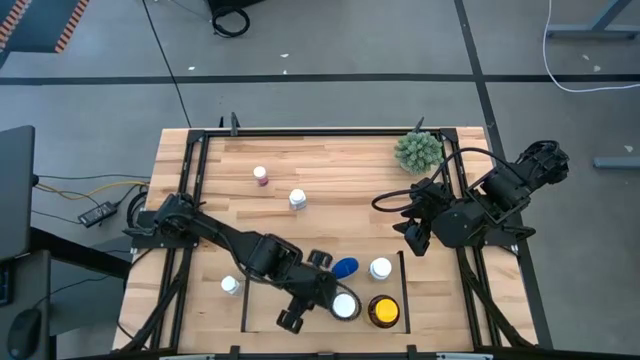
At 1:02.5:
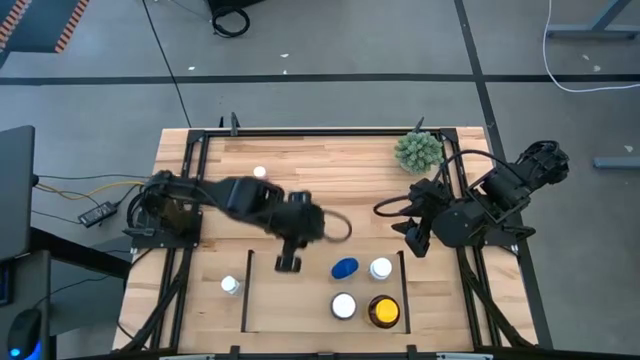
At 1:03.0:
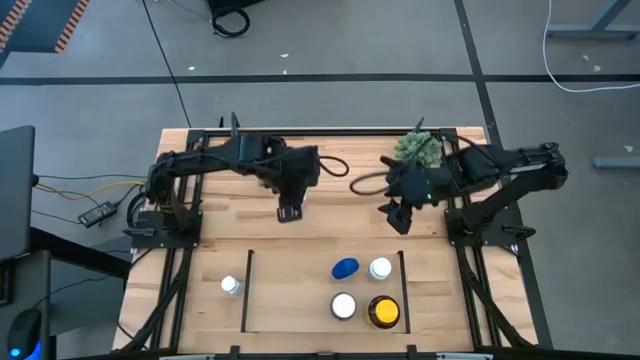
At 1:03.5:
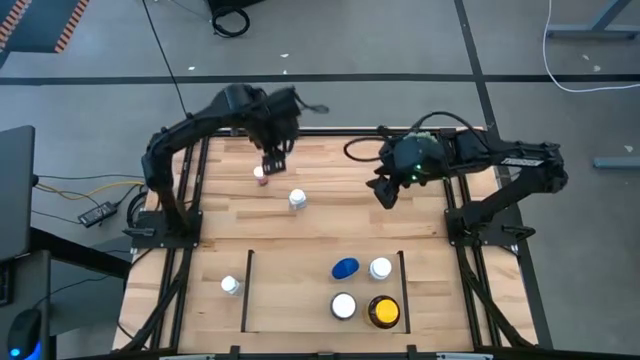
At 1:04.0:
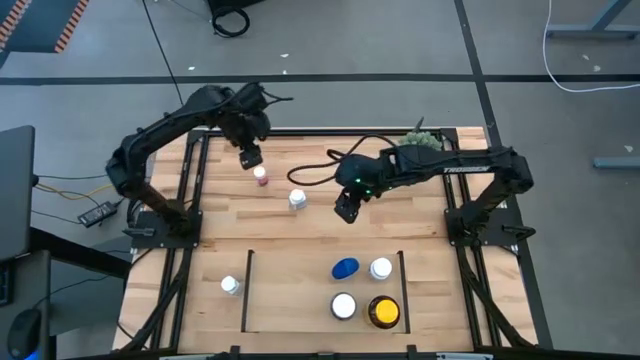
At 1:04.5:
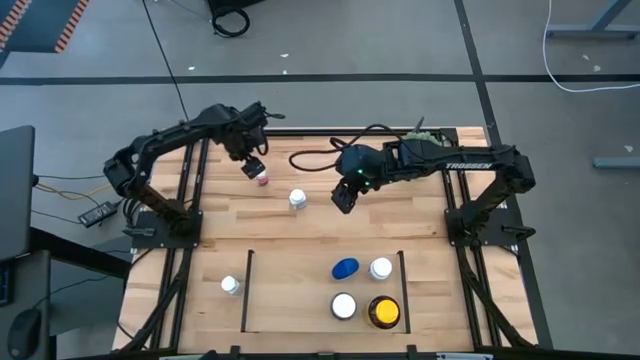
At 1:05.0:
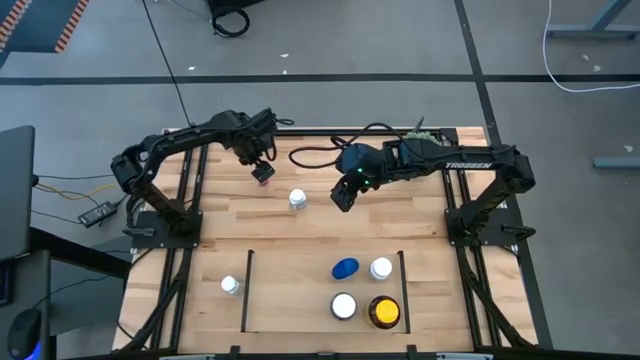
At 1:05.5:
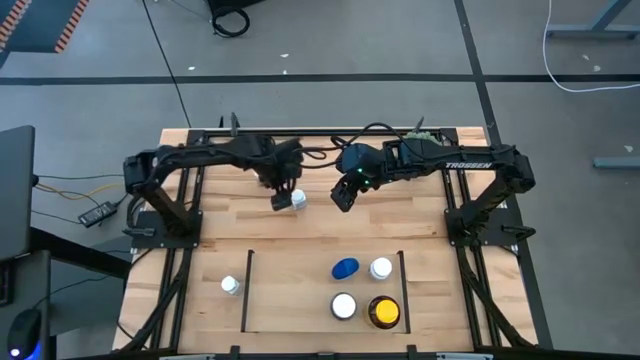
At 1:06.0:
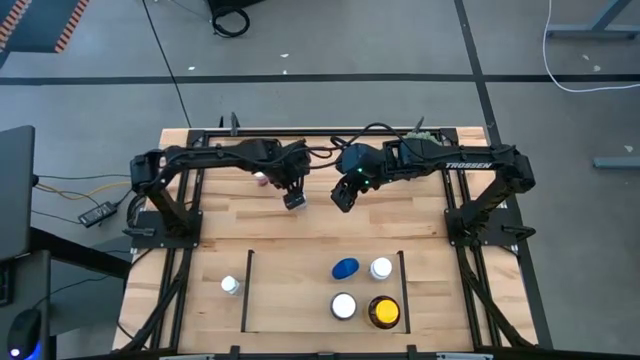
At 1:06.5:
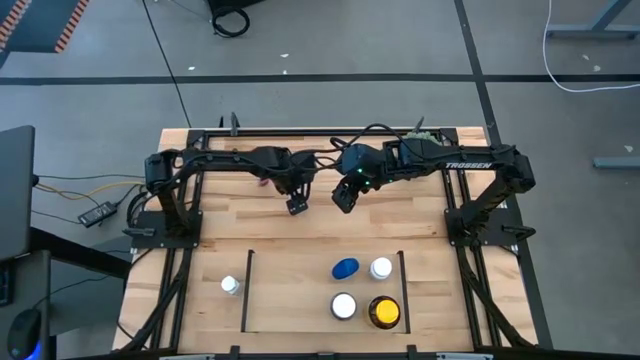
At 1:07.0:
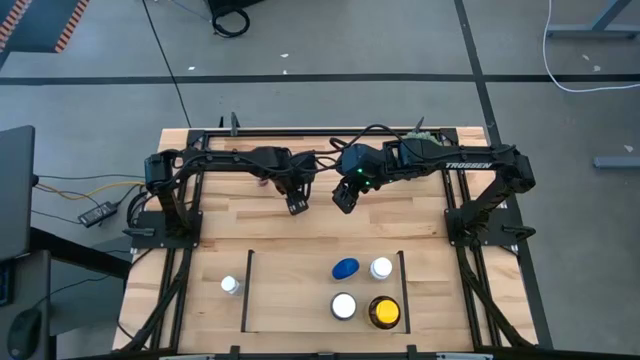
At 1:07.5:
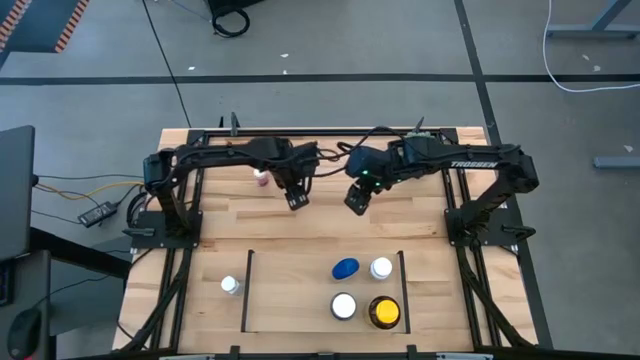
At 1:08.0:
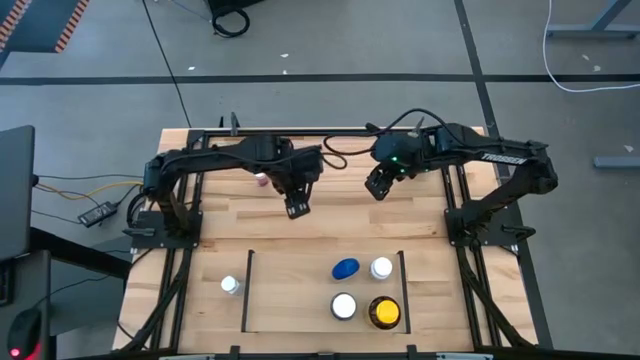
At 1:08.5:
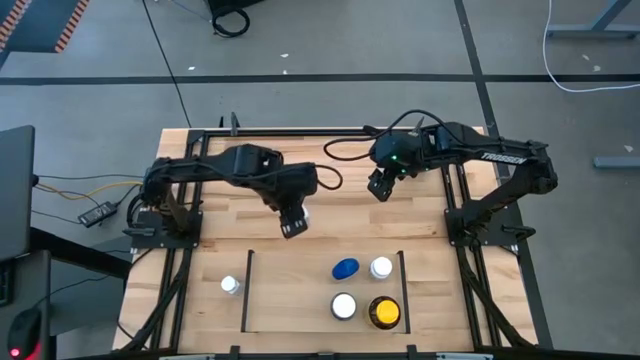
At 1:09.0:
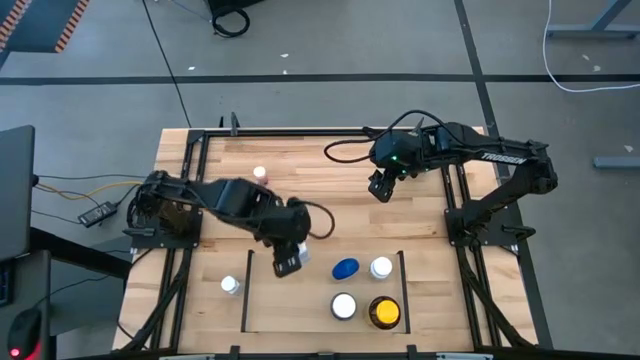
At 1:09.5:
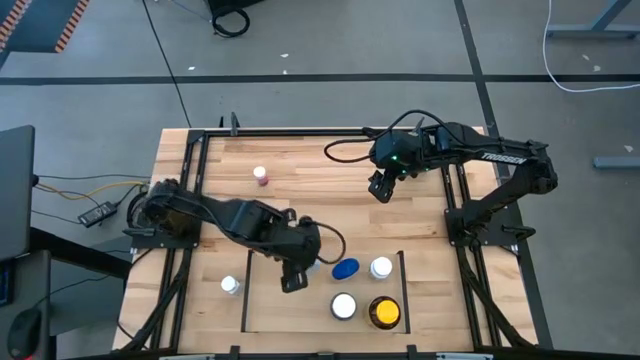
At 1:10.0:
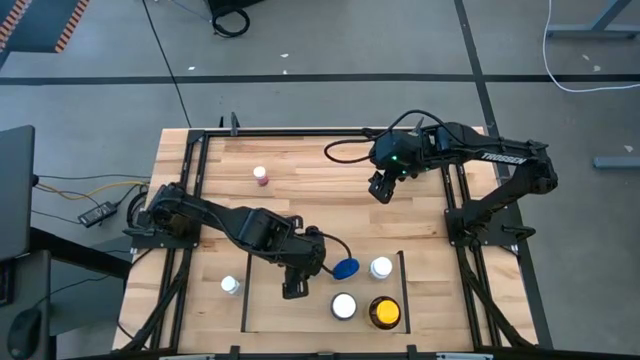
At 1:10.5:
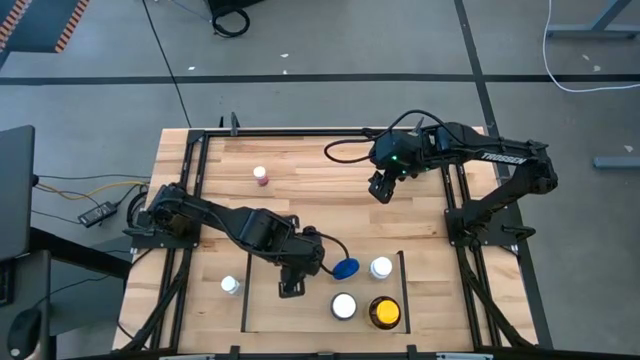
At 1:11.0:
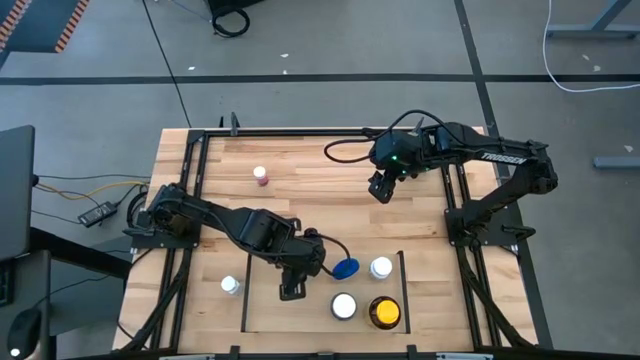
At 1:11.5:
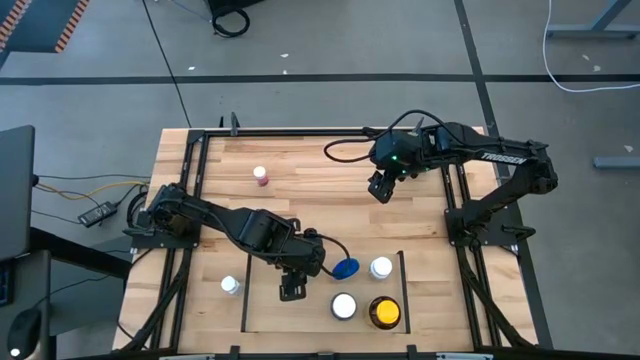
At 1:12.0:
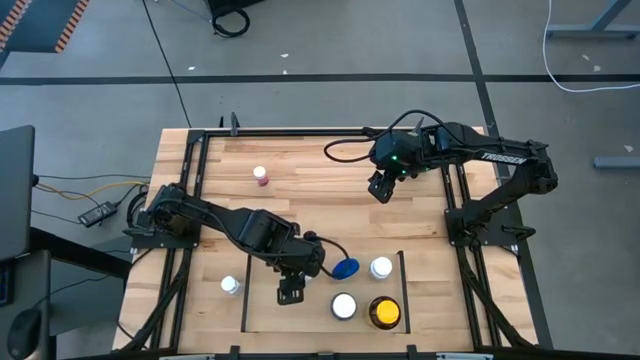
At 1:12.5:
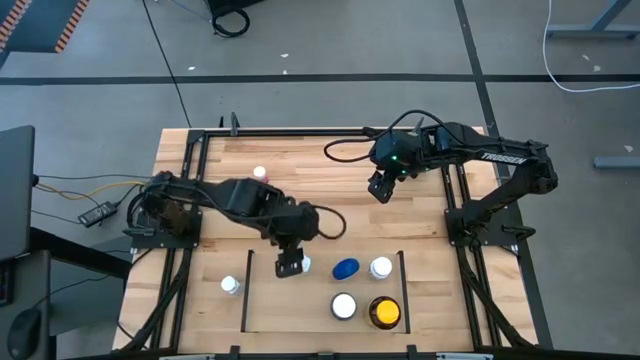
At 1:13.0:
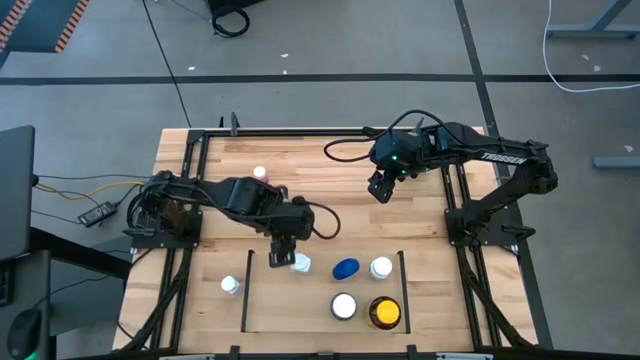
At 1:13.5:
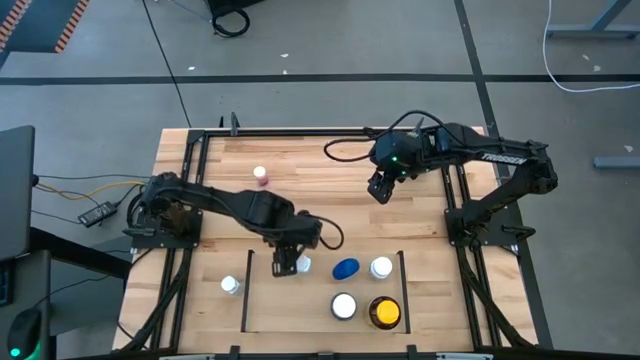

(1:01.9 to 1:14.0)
Task: Pick and place medicine bottles onto shelf by color
Put the top white and blue medicine bottle on the shelf

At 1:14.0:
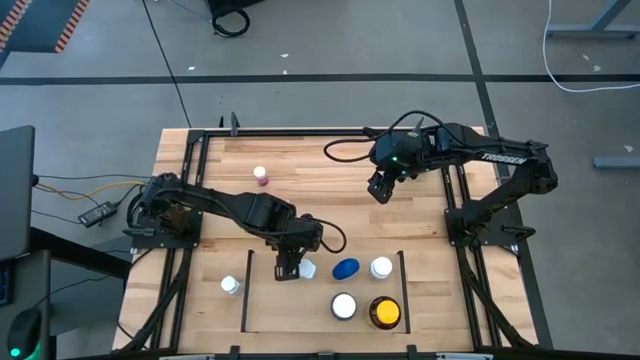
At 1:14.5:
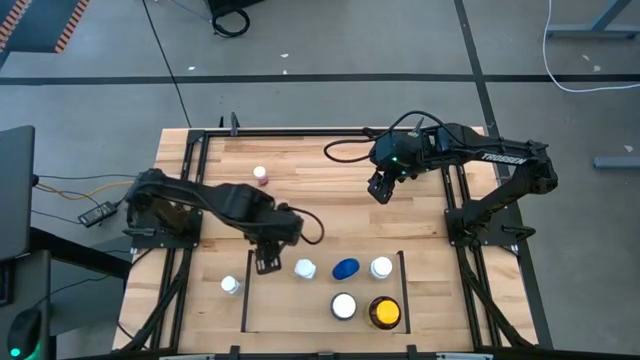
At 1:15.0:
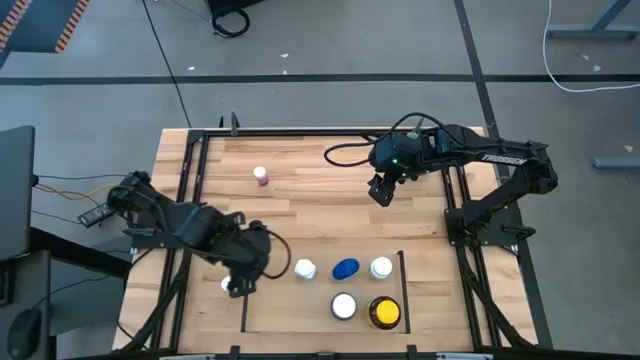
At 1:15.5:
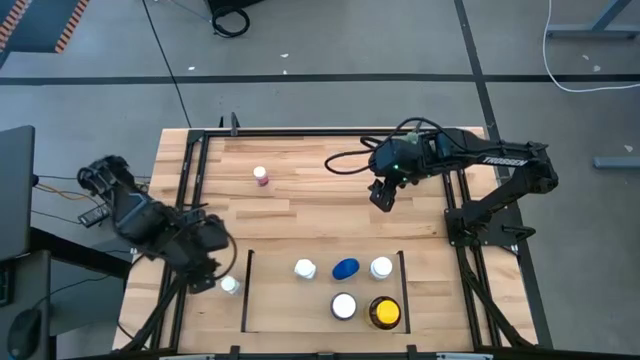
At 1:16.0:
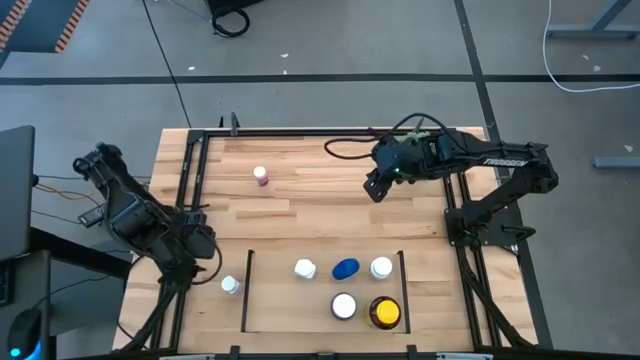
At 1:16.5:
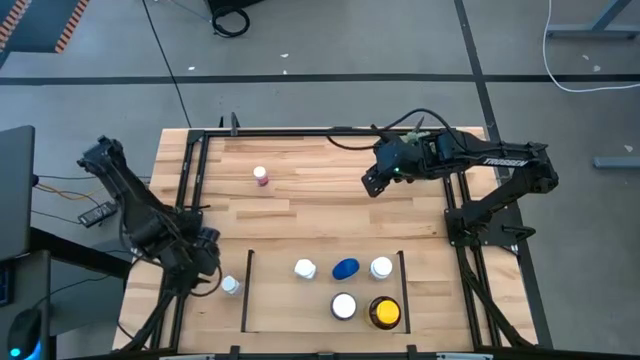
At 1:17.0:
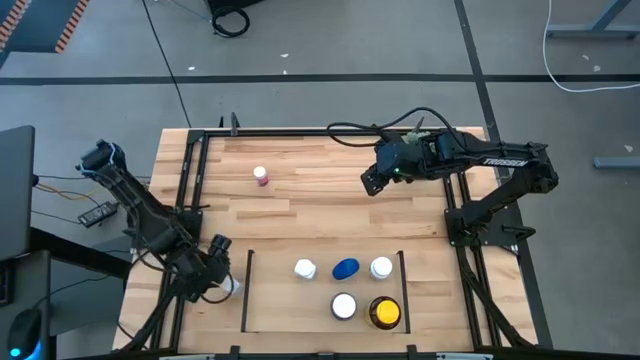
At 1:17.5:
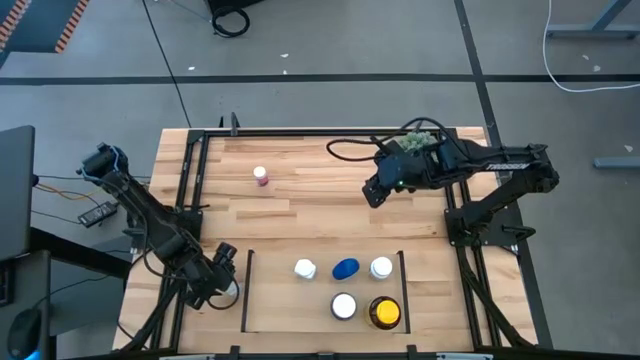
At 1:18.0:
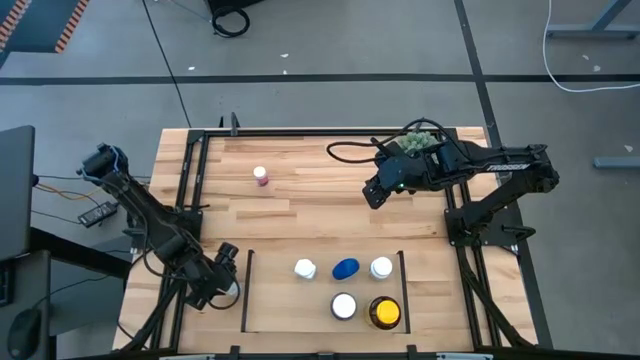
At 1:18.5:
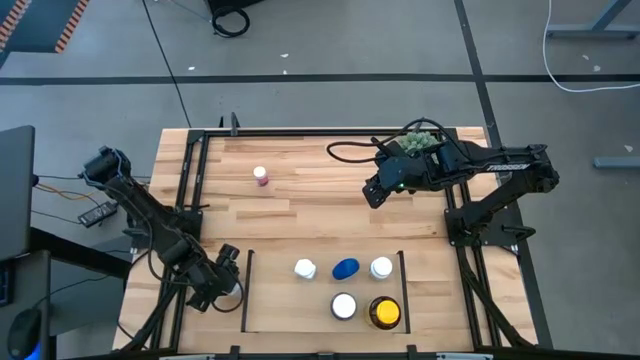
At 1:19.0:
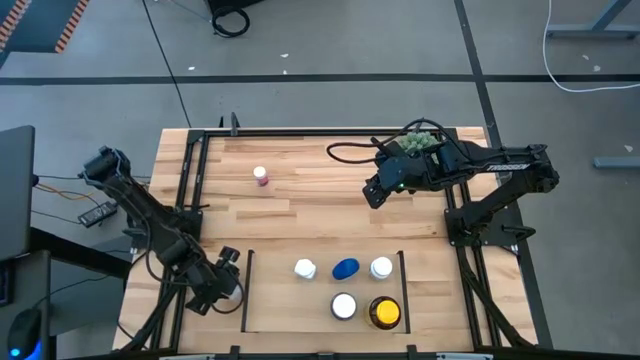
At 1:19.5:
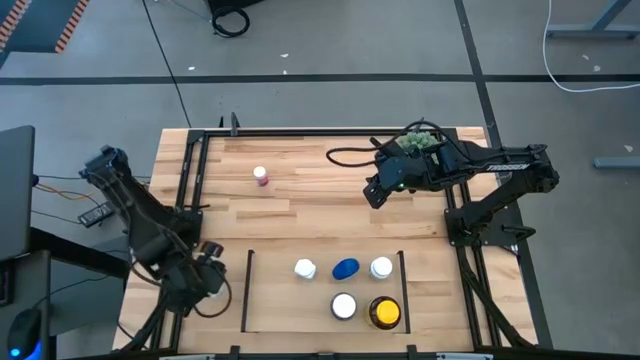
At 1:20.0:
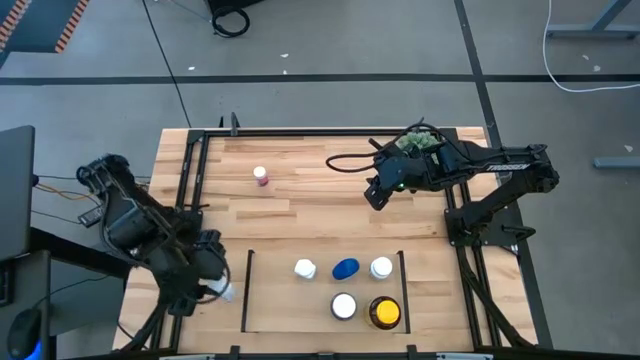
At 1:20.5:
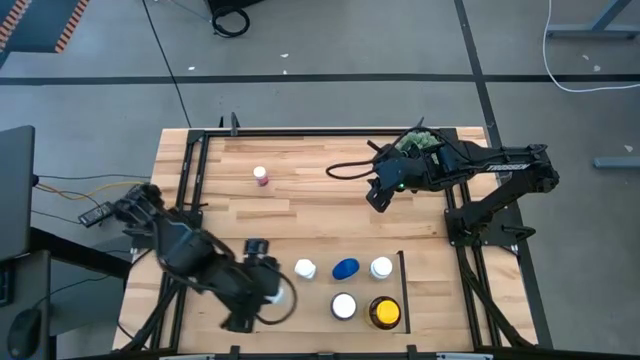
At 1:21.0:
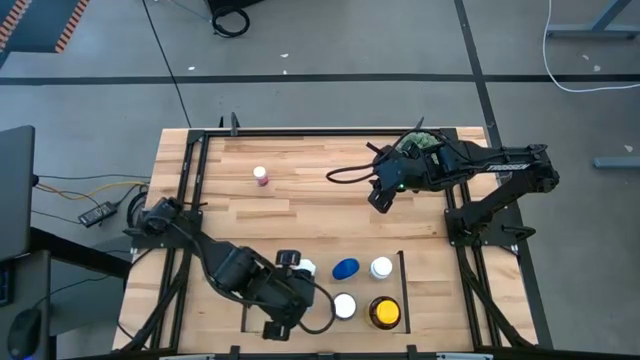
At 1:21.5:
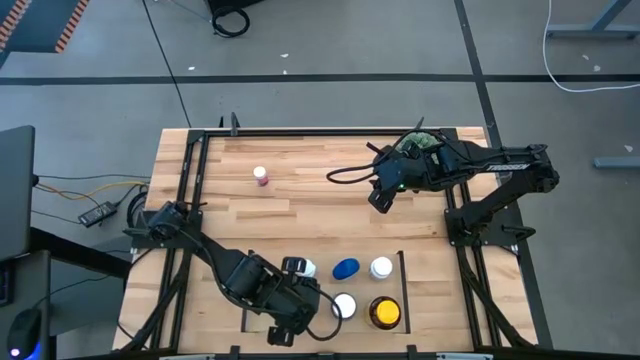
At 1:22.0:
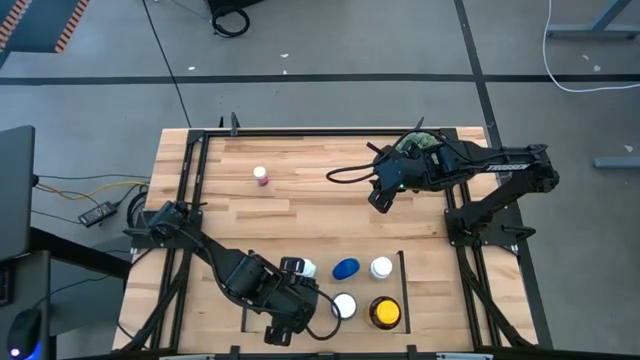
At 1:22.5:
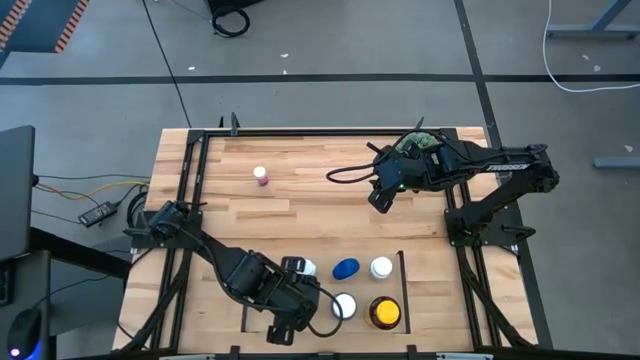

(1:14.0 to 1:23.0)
Align the white and blue medicine bottle with the other white and blue medicine bottle on the shelf

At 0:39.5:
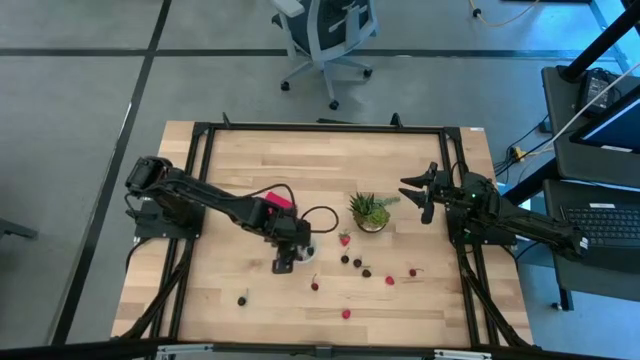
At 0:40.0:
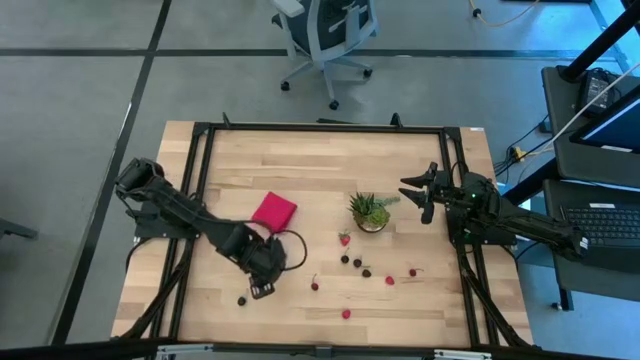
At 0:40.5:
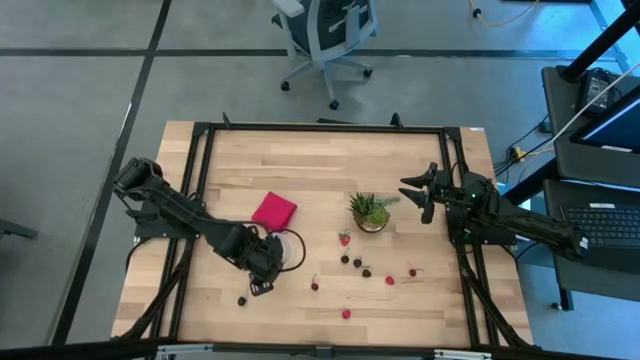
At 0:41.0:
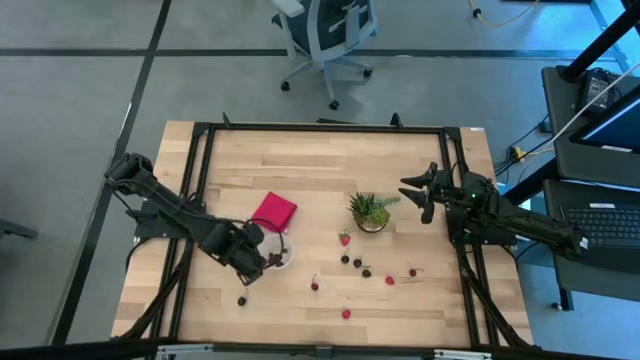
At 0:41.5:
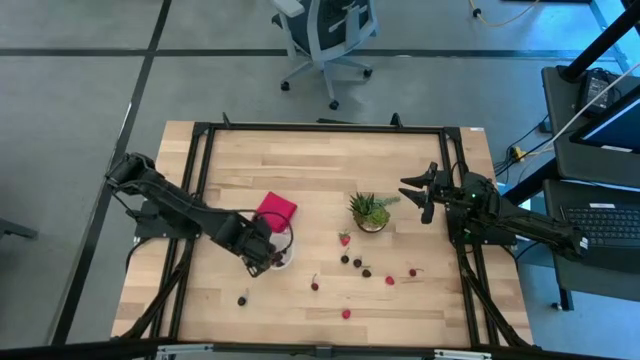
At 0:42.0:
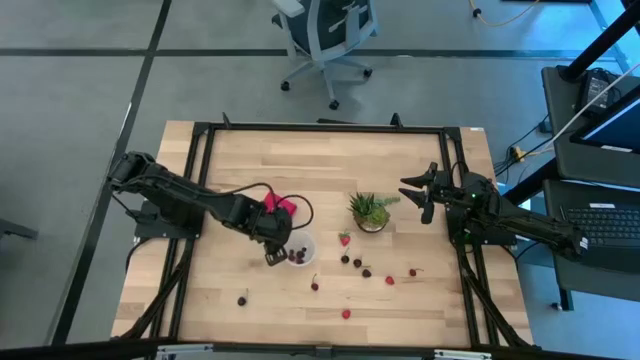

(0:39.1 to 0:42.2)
Task: Pick and placing Produce into tupperware
Adjust the container on the table
